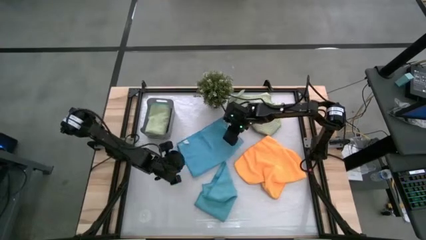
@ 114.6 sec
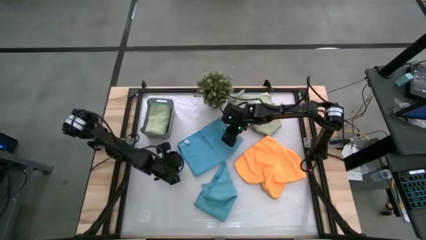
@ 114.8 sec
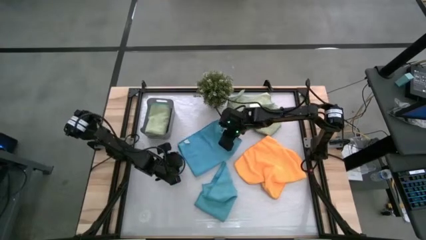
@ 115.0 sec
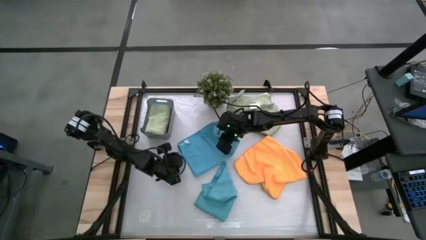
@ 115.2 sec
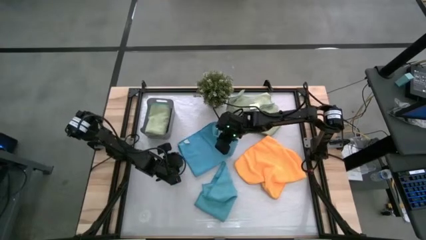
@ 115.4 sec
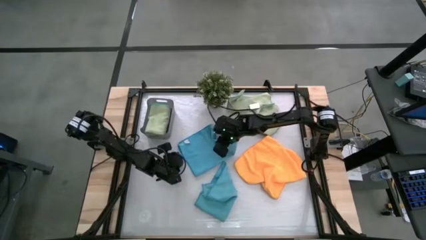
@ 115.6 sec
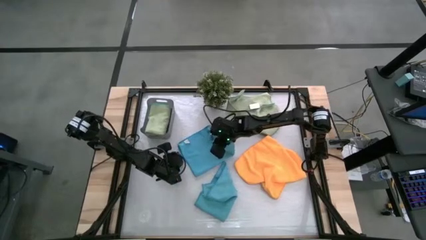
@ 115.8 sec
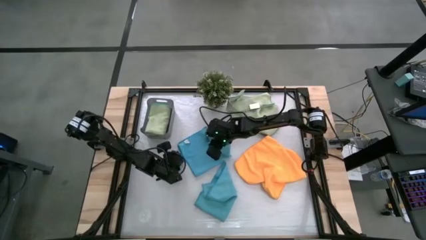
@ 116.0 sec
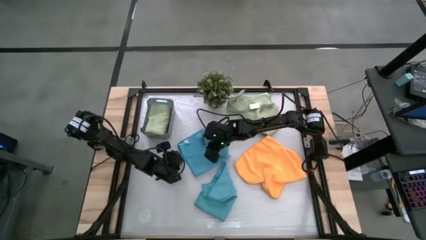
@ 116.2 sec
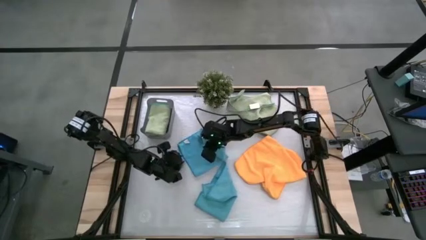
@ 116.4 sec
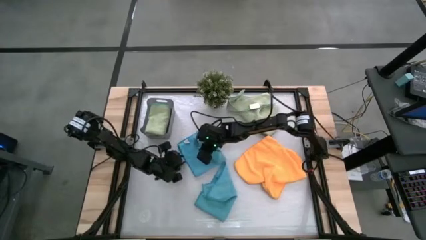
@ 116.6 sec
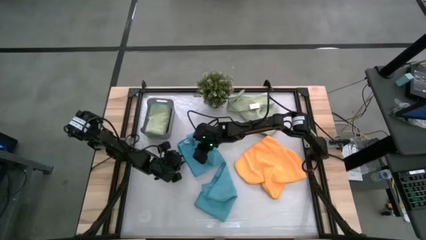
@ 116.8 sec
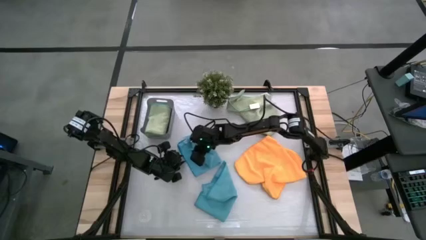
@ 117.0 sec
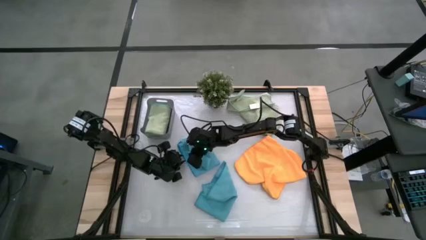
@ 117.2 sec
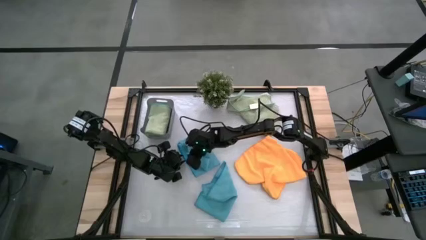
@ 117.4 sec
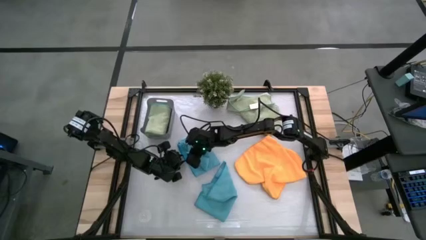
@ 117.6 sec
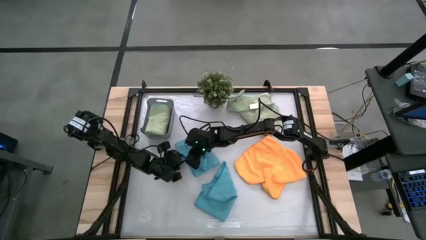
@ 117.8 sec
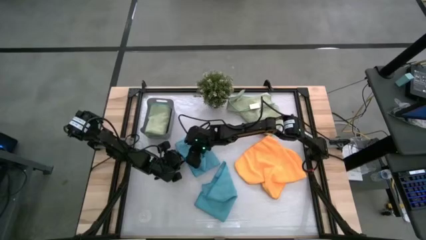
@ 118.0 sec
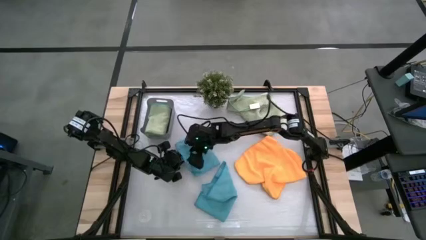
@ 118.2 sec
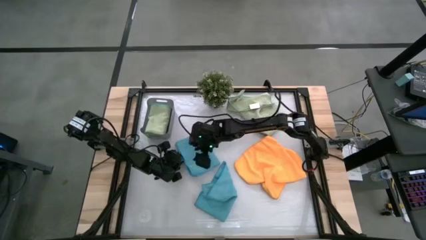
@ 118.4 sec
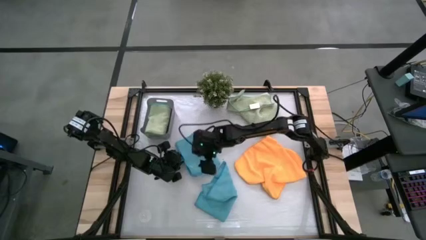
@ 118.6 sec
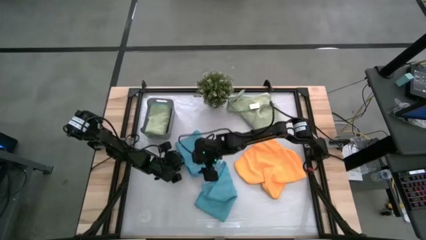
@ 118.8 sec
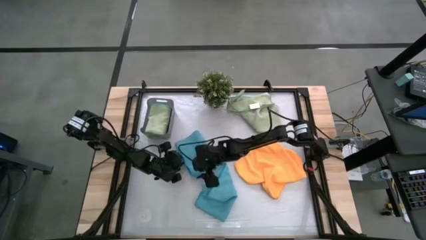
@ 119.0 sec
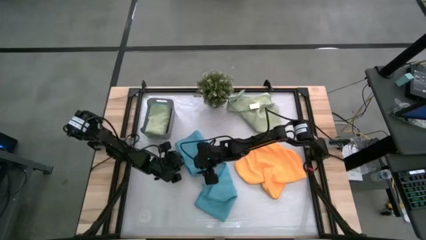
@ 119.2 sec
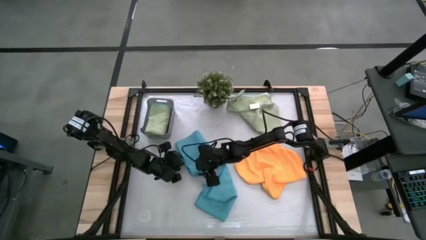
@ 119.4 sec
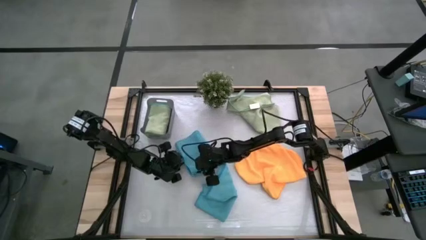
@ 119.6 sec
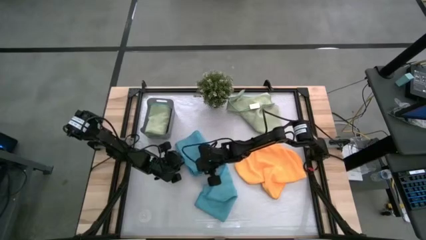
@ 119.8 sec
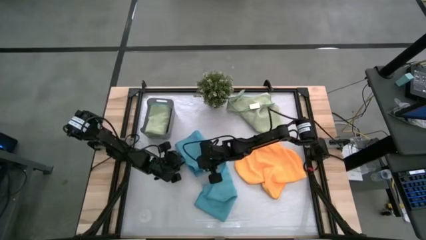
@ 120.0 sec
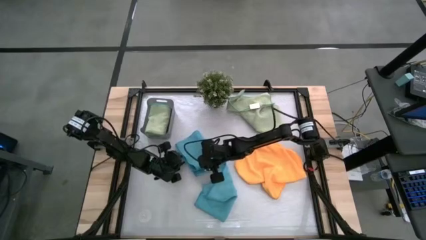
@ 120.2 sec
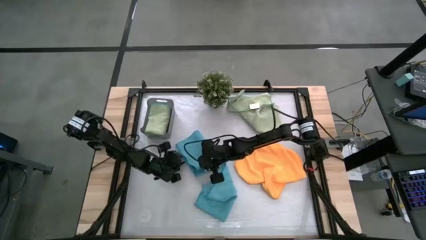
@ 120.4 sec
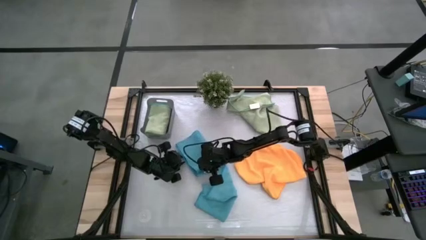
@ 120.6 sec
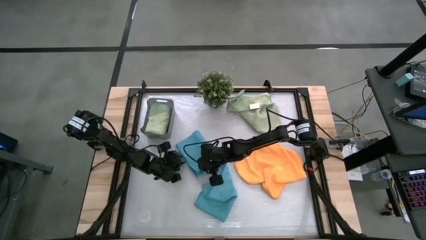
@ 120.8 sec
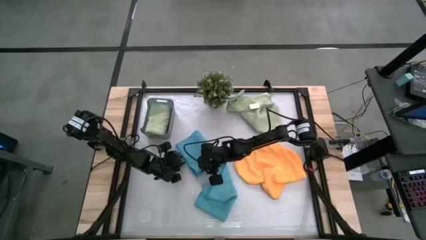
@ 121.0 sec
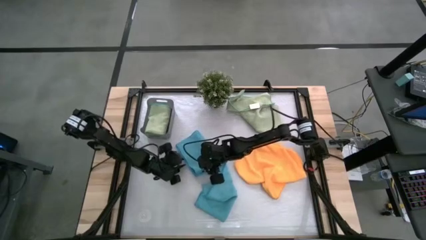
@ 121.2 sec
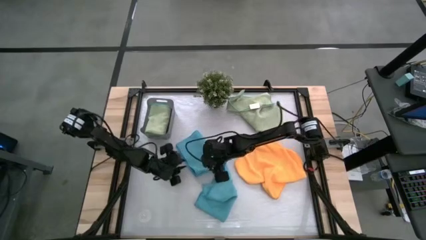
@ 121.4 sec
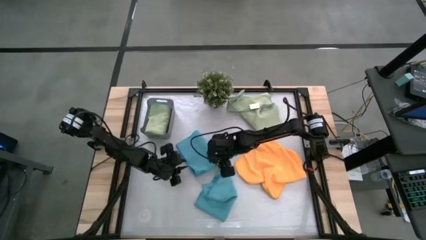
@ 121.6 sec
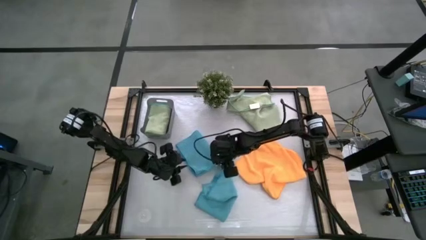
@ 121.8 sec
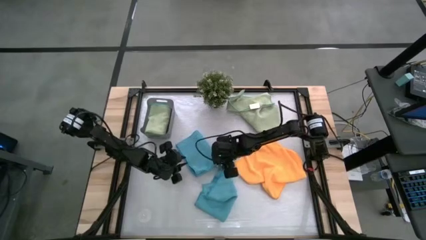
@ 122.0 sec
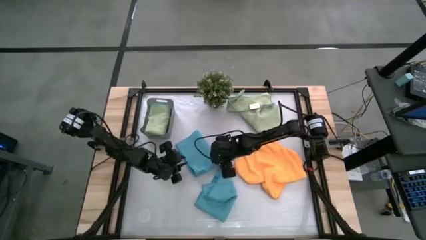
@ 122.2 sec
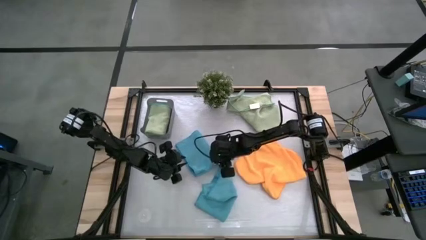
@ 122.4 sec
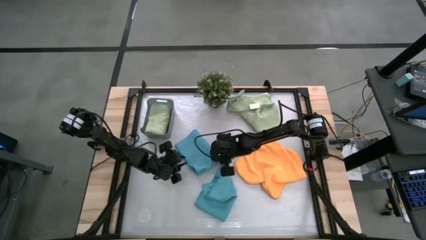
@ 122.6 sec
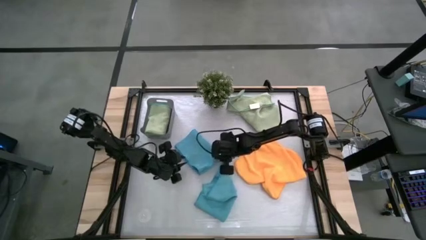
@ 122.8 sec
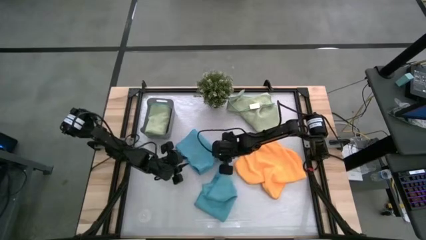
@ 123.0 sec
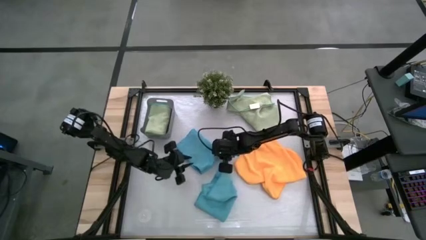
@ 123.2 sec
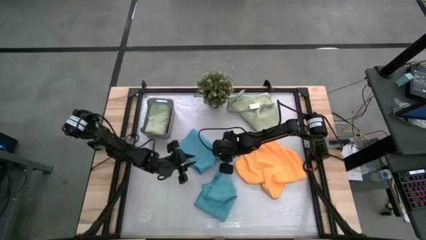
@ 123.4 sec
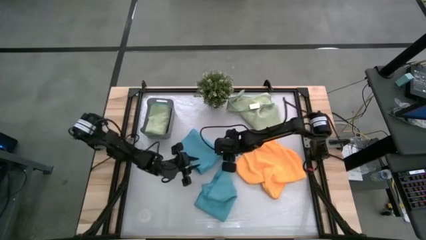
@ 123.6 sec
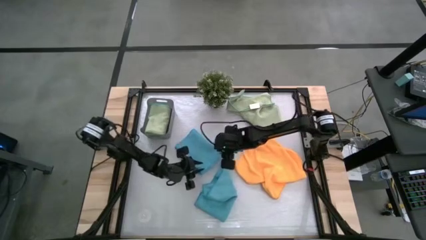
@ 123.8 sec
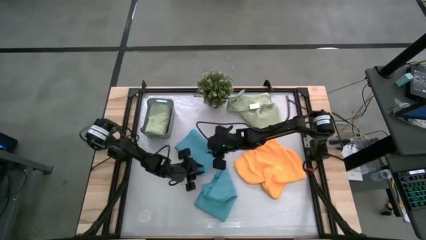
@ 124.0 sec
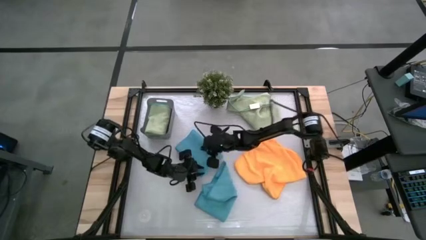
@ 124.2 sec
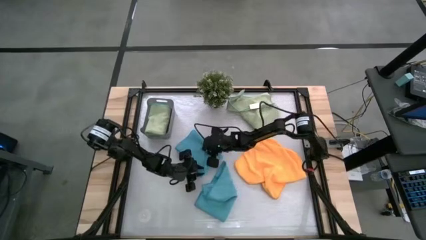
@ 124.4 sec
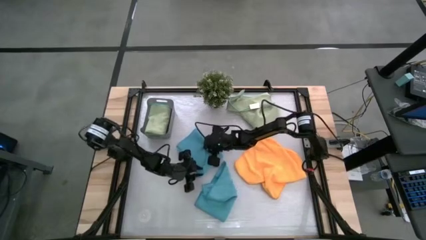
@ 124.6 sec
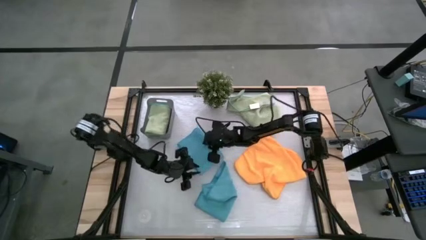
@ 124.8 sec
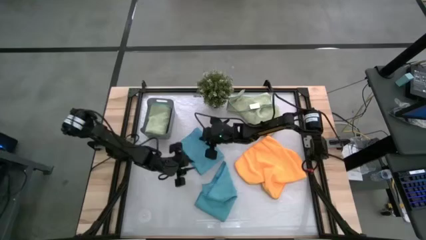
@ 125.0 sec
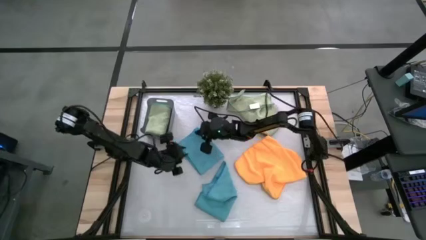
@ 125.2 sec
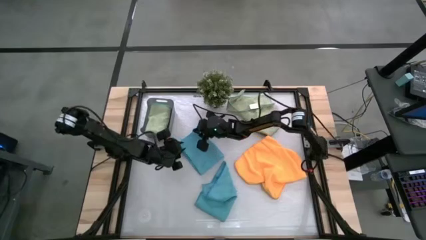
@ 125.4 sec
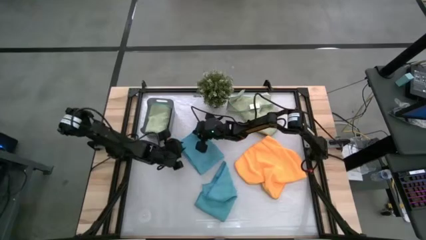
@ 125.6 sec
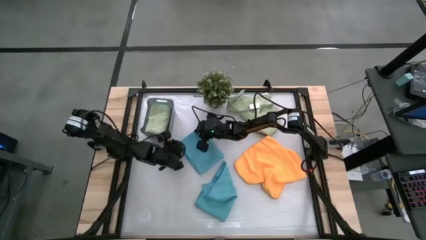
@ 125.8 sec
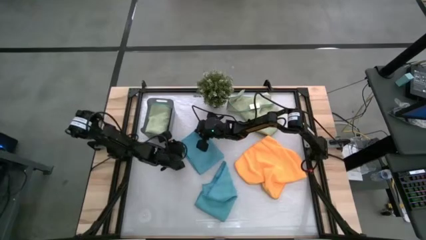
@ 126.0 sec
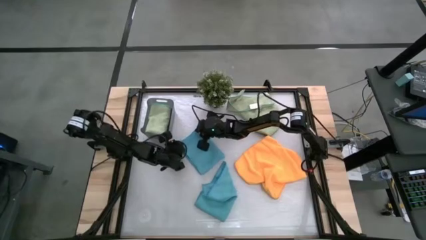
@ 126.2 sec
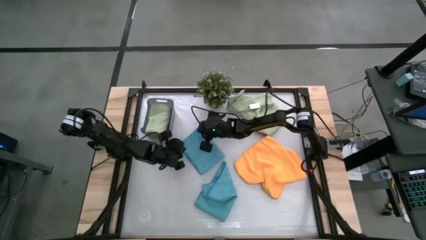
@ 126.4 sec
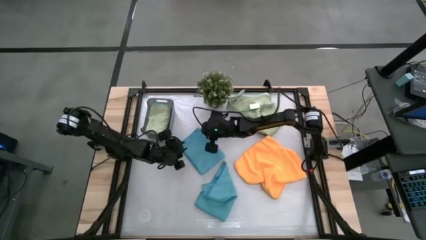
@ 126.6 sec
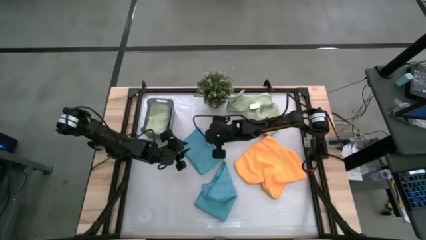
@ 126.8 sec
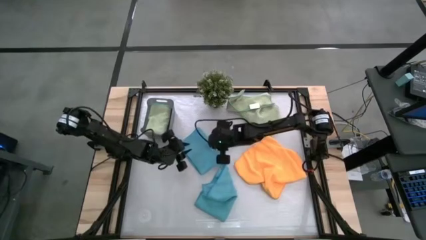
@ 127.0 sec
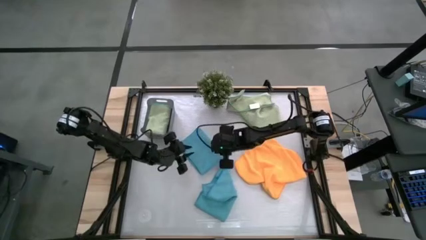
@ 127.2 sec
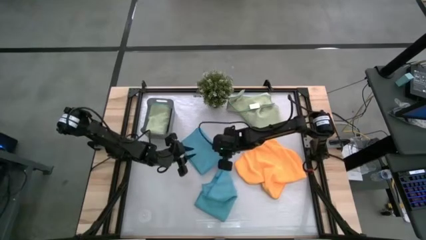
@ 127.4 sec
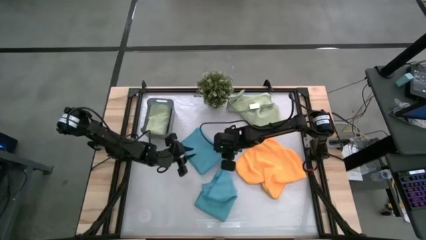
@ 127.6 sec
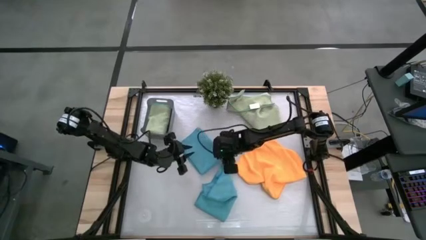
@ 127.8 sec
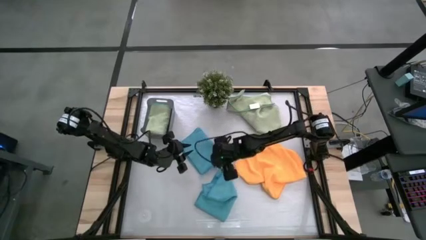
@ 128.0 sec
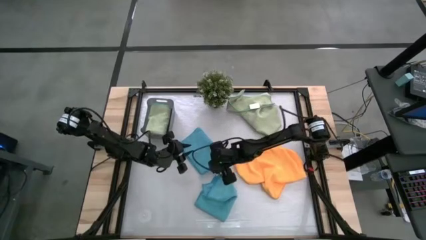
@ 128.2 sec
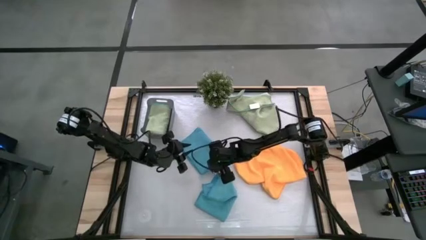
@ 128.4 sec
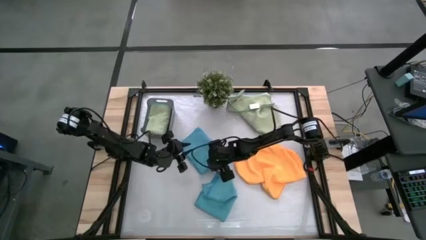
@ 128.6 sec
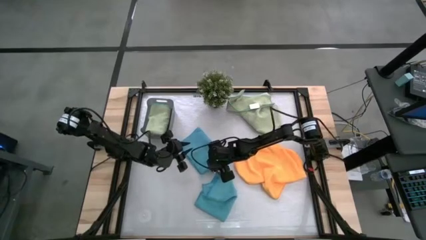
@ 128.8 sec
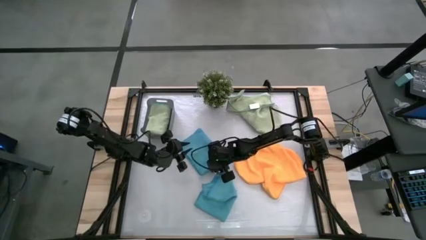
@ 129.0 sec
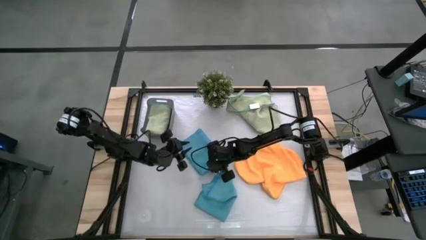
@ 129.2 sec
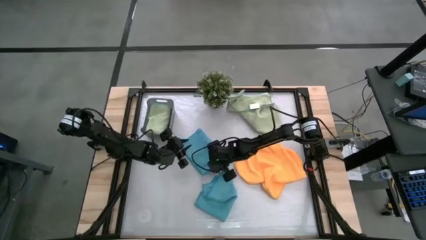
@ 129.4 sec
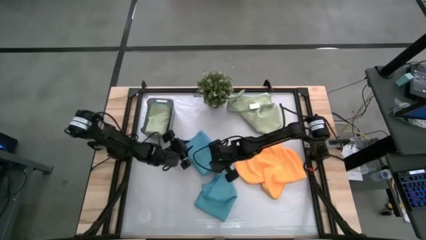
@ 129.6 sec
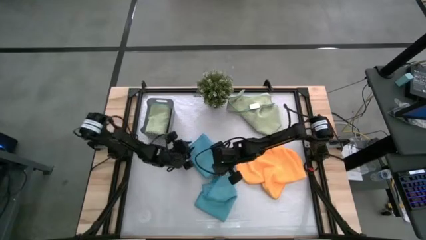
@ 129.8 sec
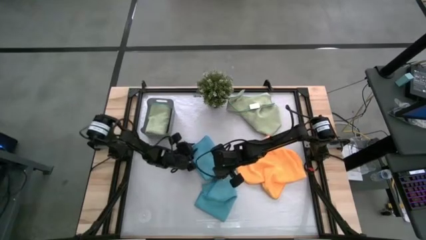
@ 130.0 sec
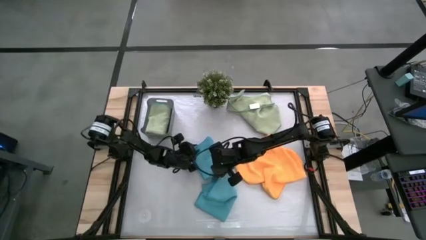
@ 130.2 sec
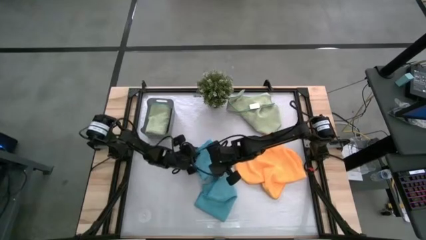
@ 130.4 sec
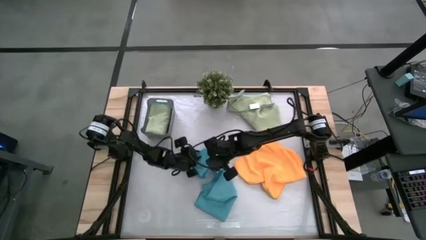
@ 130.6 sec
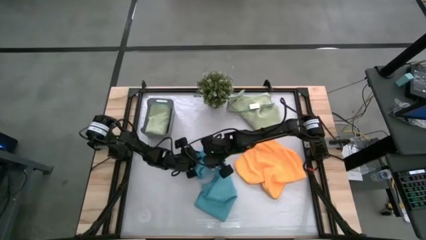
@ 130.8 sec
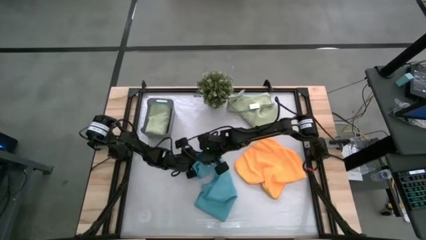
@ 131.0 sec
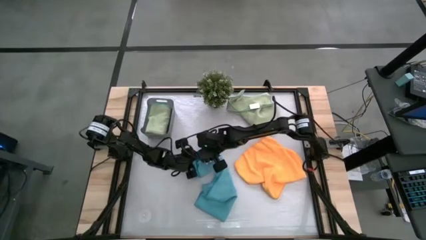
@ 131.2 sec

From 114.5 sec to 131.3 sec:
Task: Fold microfiber towels
Fold the left blue microfiber cloth
